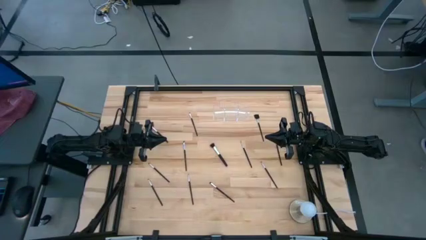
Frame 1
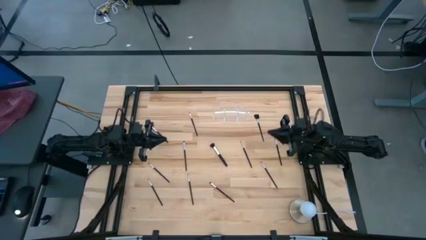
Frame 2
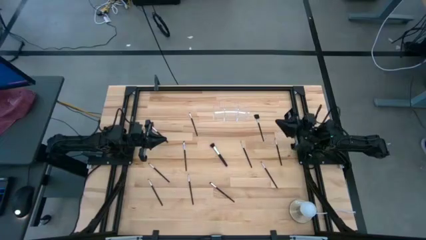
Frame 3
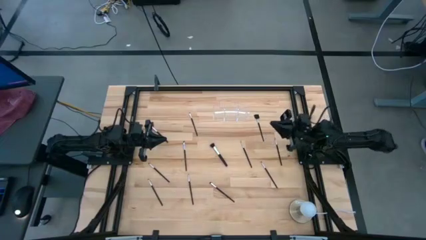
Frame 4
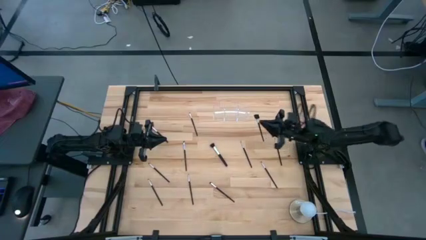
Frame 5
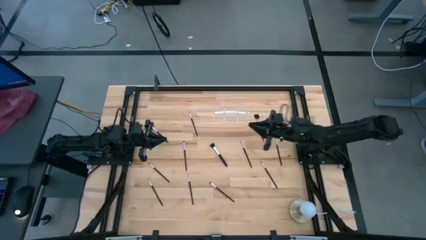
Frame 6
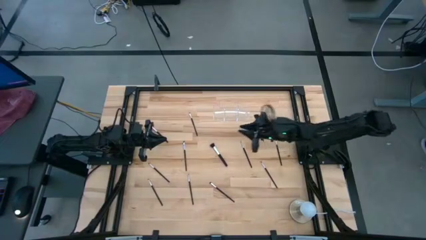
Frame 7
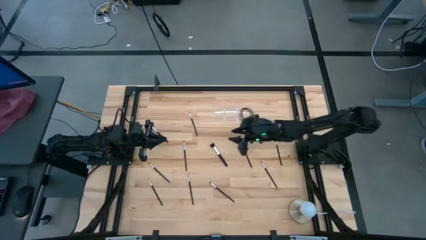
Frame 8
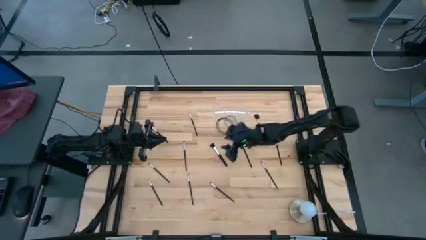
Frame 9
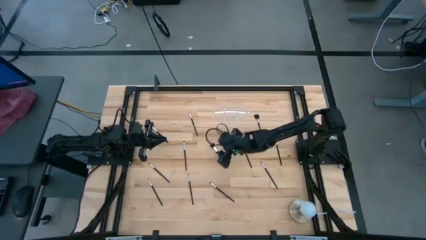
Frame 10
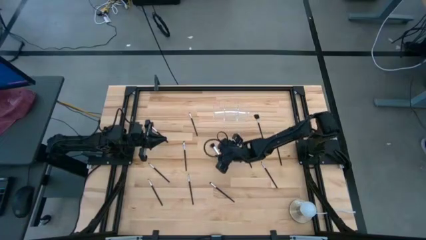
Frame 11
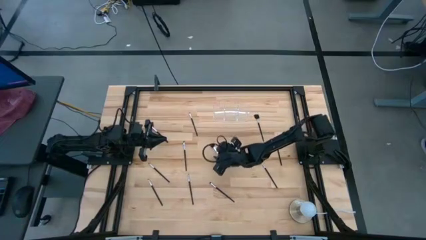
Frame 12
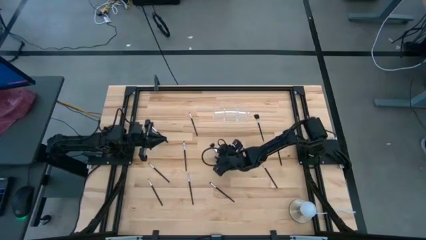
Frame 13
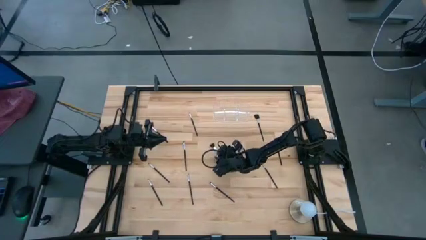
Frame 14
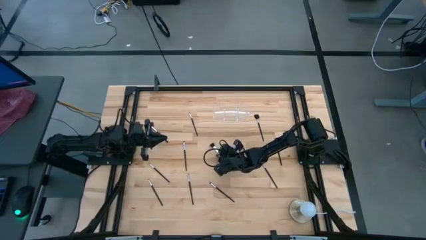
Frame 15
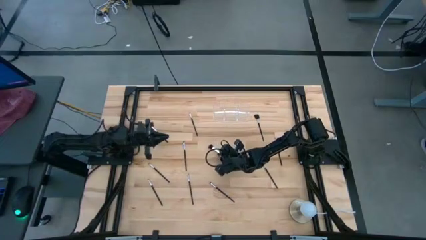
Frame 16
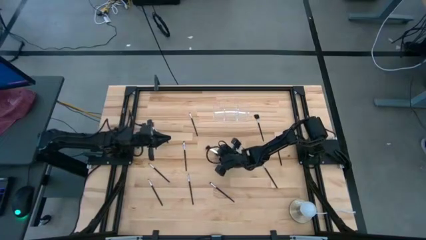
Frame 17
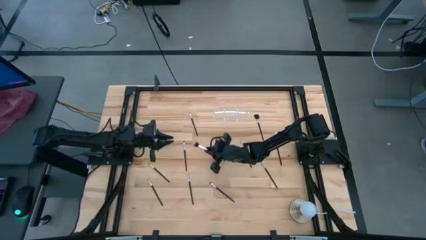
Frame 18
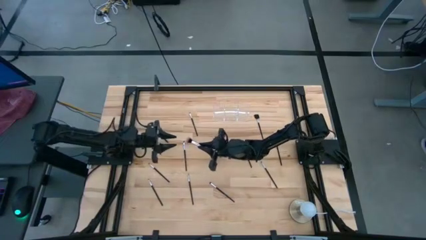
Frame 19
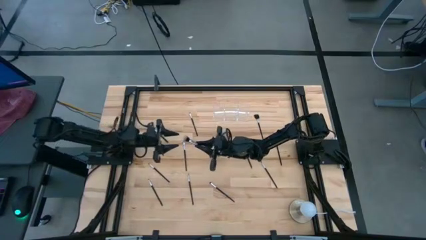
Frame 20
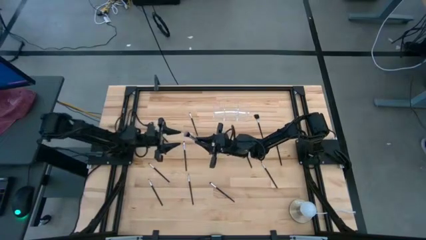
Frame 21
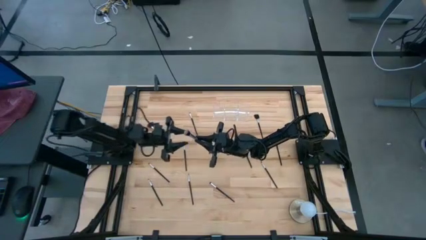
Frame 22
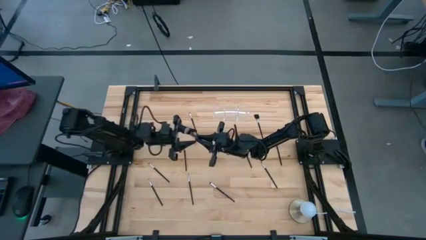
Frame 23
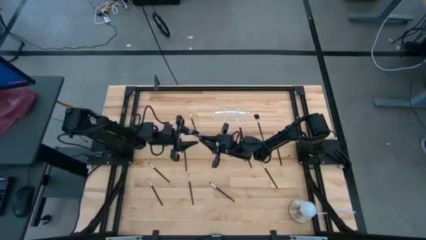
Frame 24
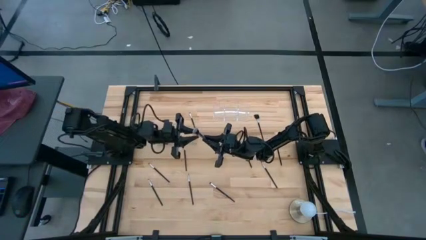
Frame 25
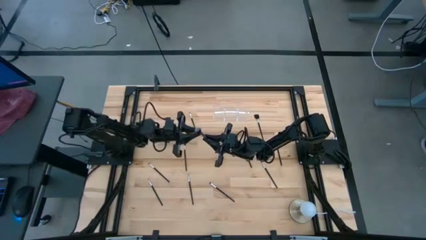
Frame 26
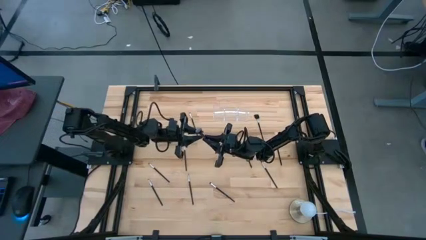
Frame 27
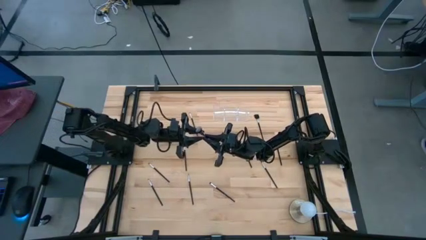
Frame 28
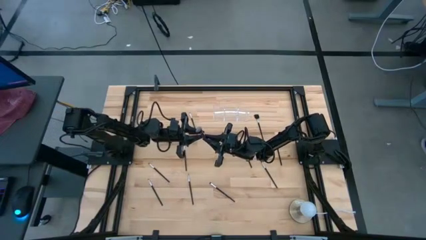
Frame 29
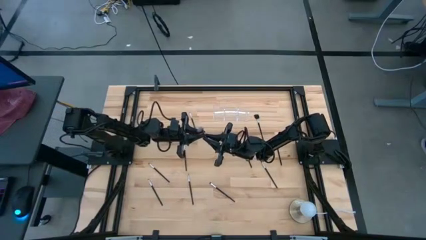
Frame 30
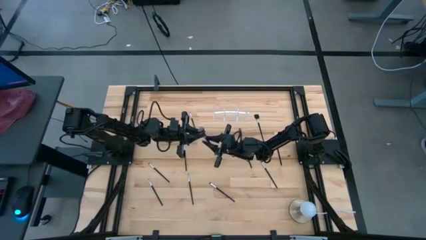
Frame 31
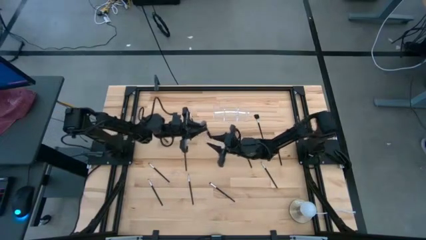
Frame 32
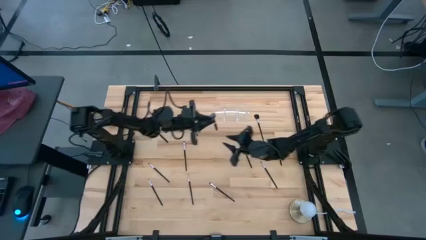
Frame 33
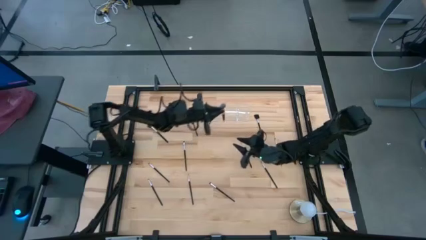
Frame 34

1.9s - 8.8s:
Task: Put items in baskets/containers
Put the black blush brush into the transparent organizer

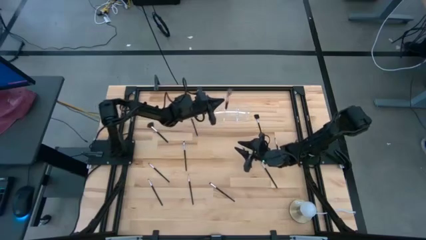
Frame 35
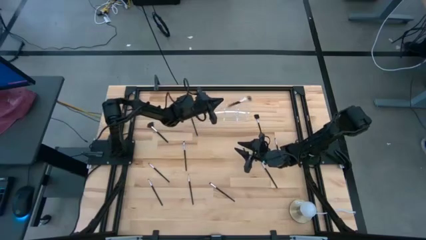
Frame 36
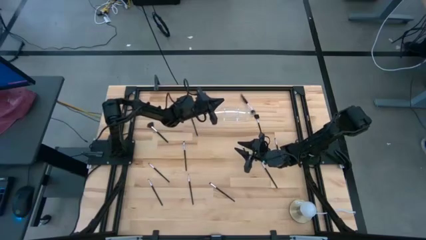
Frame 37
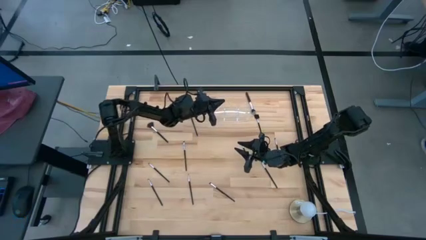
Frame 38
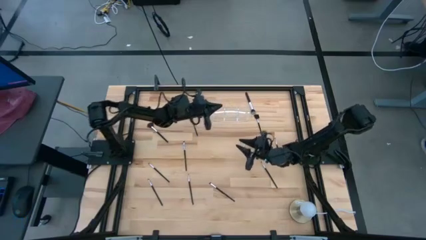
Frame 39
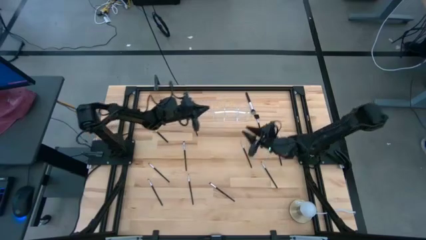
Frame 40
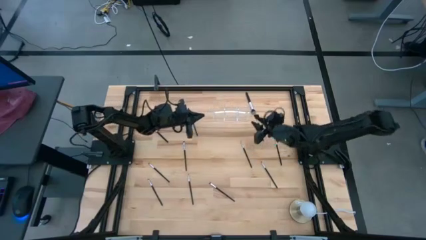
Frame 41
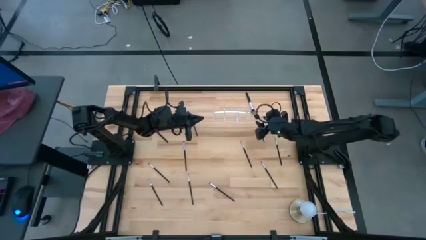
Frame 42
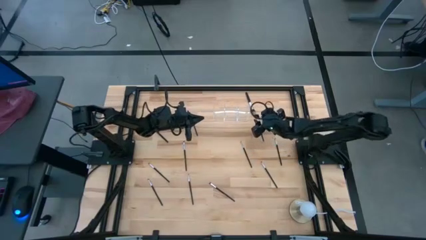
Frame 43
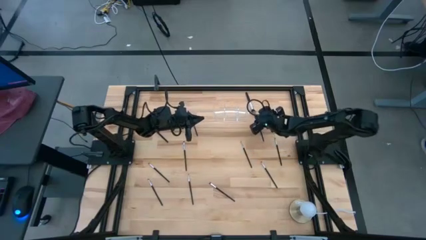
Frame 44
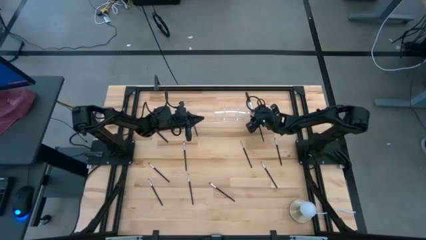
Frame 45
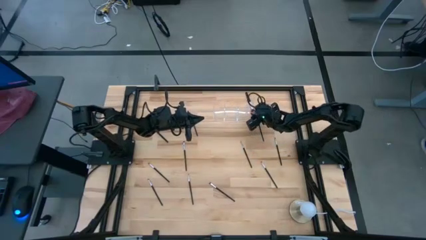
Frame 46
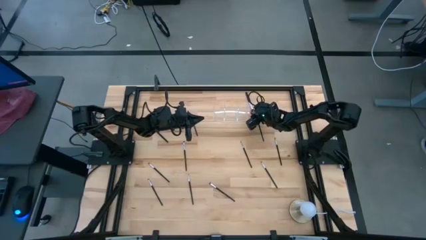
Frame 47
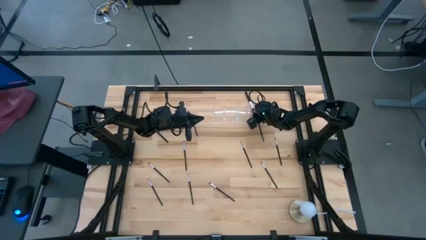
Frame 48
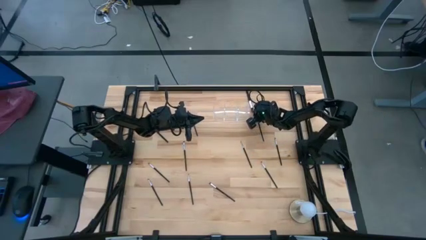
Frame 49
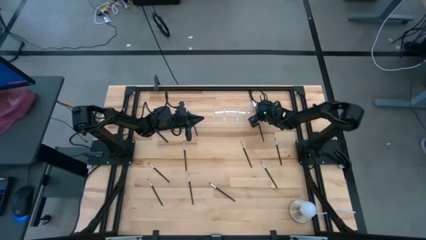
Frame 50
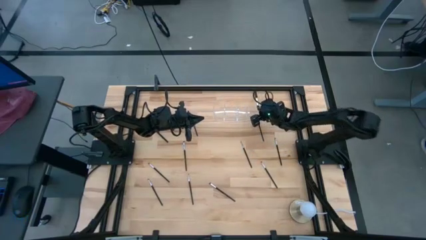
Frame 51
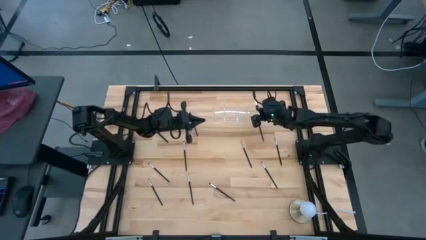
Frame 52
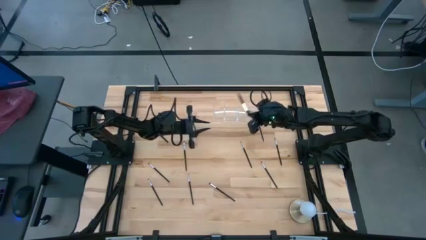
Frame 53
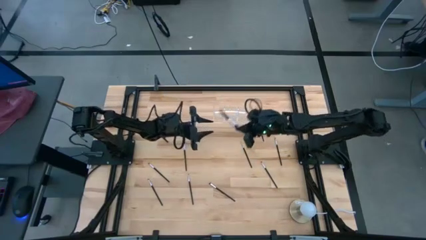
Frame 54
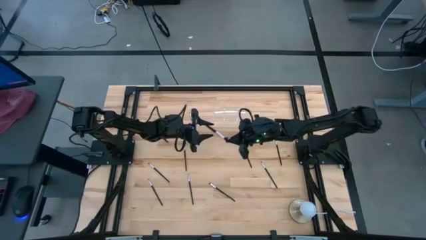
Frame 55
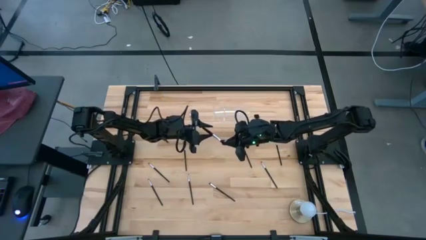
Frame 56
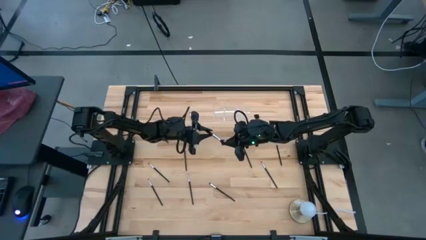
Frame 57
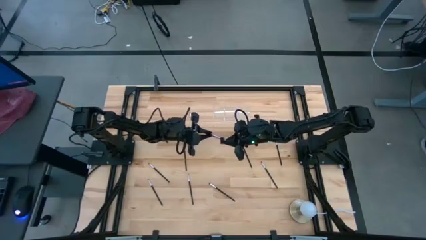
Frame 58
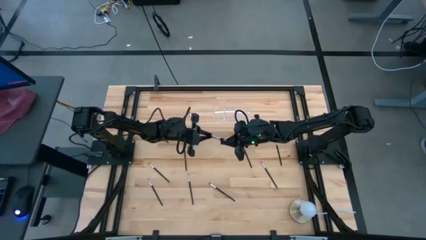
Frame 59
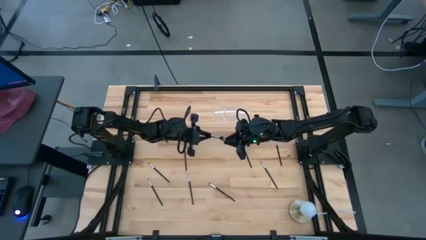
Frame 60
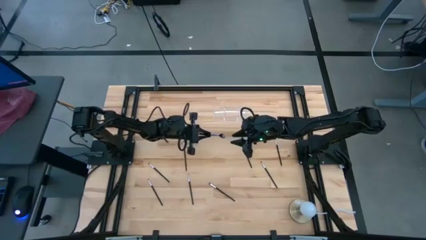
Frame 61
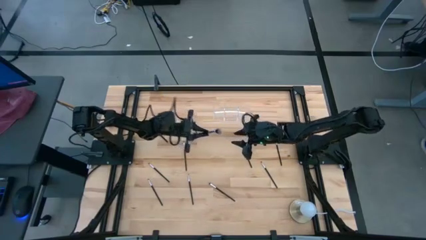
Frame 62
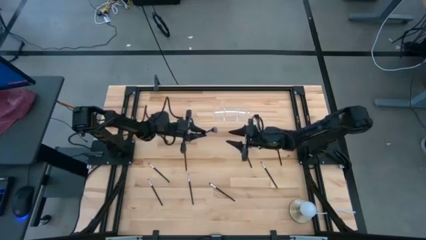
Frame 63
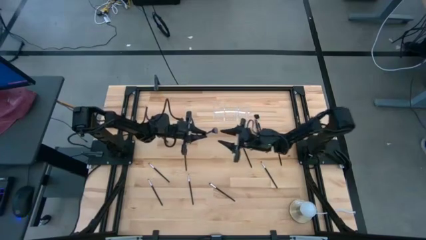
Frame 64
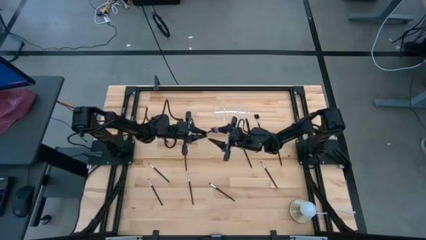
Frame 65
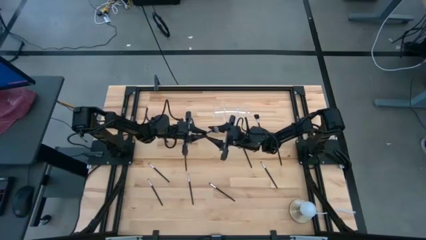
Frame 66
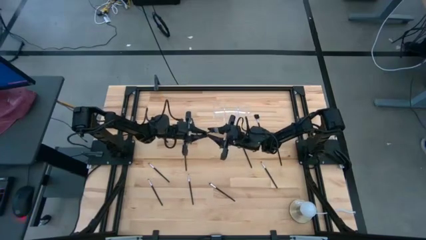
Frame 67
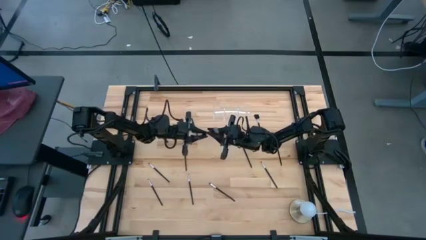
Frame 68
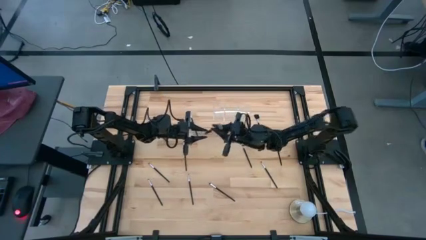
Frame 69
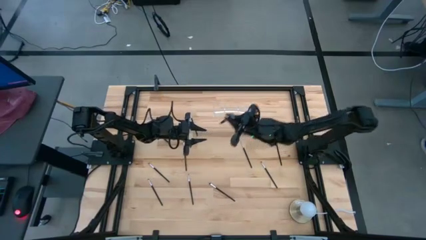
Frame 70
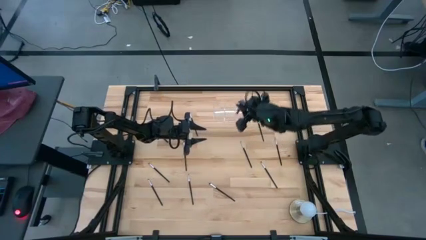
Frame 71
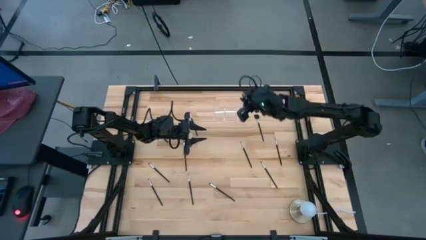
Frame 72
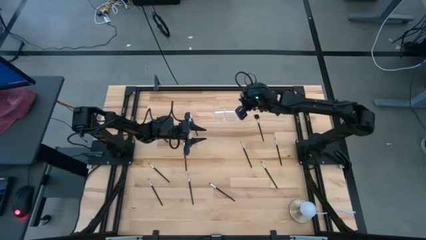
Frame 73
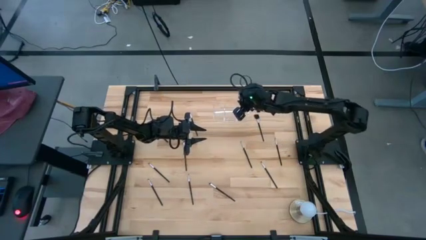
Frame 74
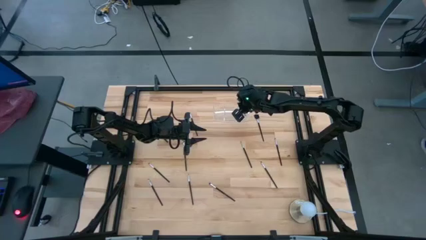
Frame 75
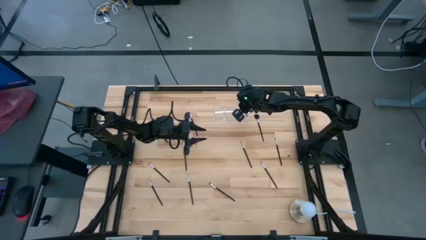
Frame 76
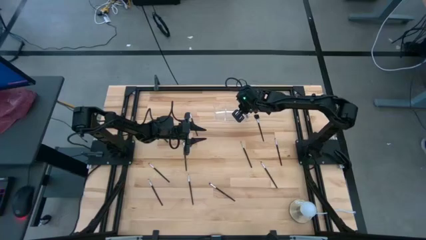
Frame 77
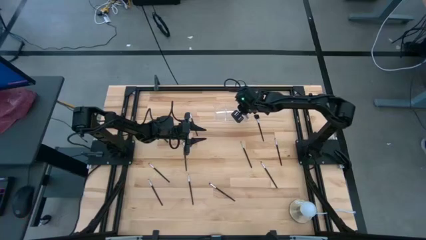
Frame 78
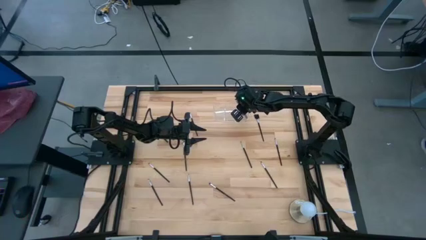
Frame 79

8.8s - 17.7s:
Put the black blush brush into the transparent organizer
